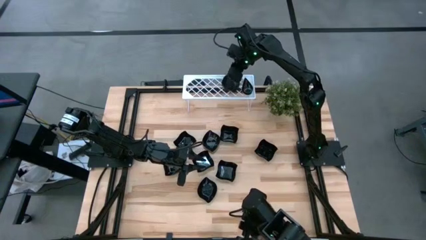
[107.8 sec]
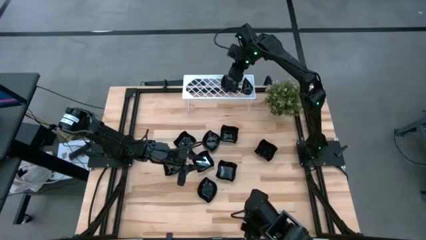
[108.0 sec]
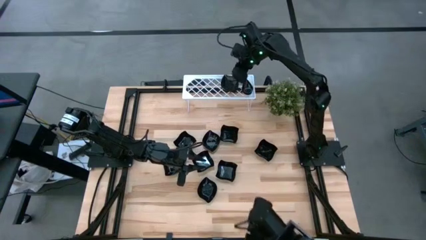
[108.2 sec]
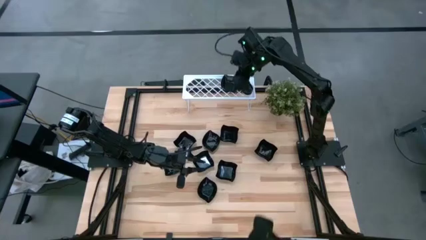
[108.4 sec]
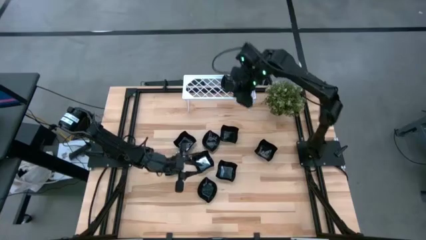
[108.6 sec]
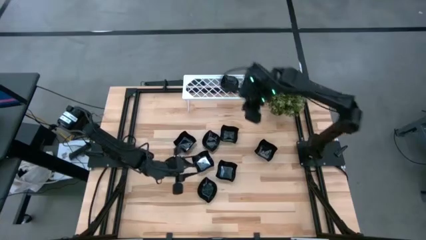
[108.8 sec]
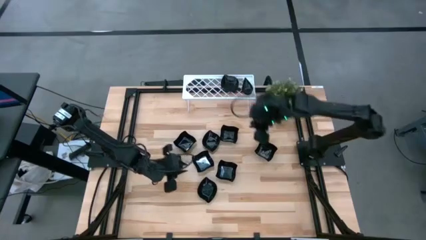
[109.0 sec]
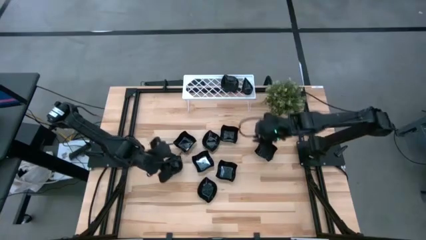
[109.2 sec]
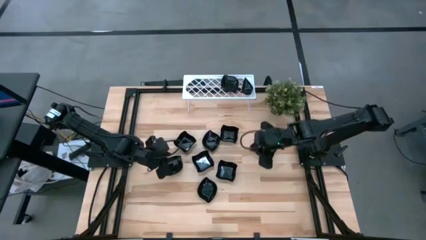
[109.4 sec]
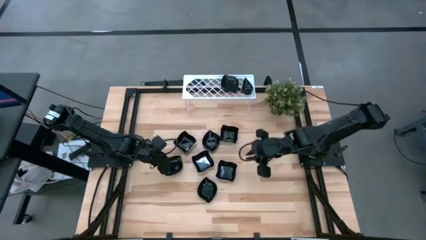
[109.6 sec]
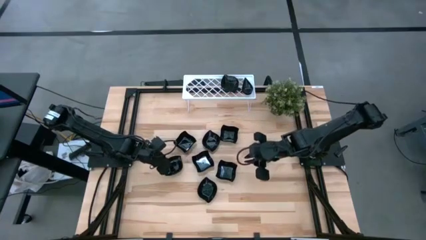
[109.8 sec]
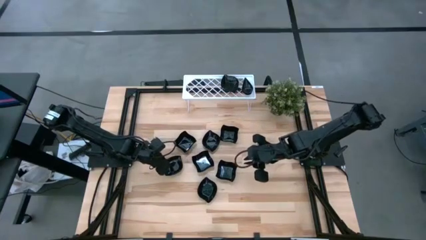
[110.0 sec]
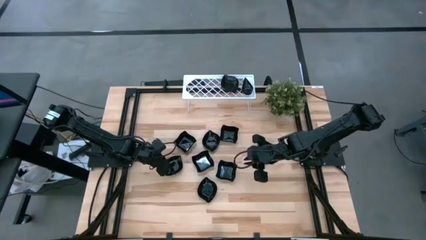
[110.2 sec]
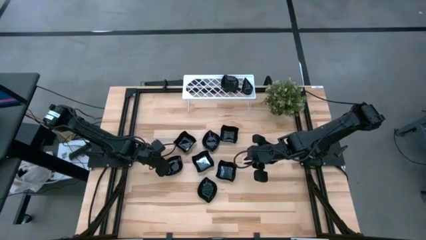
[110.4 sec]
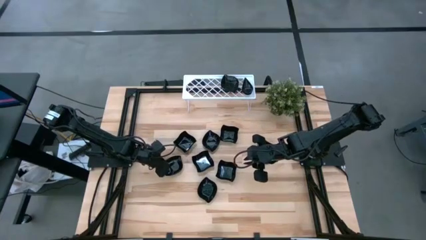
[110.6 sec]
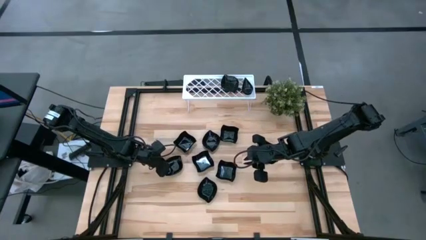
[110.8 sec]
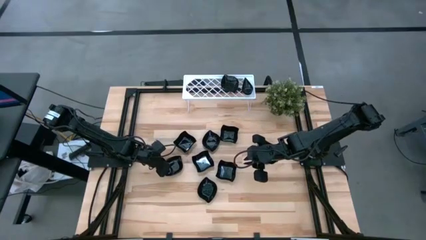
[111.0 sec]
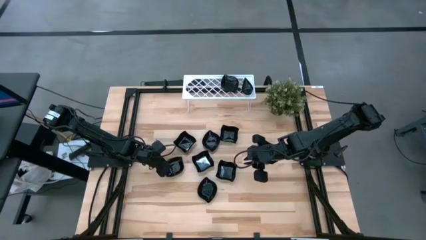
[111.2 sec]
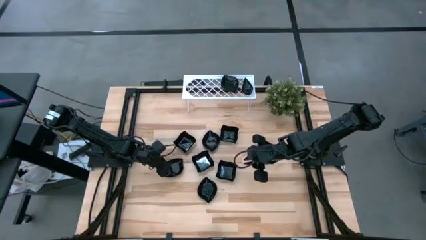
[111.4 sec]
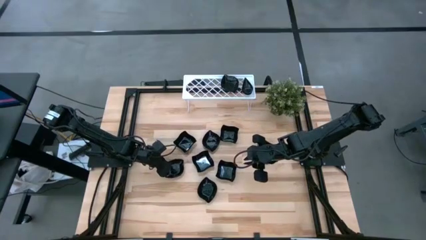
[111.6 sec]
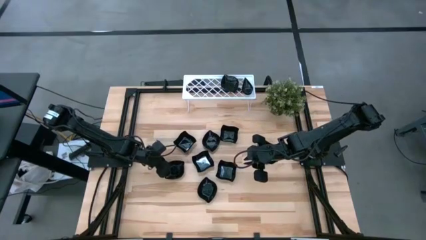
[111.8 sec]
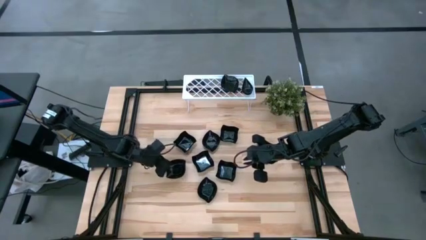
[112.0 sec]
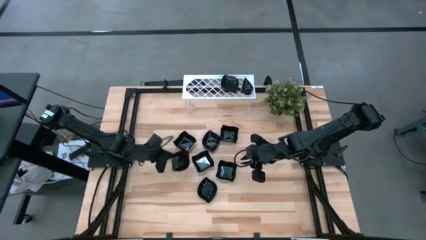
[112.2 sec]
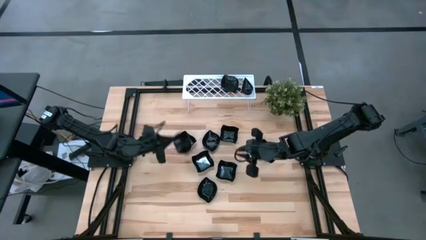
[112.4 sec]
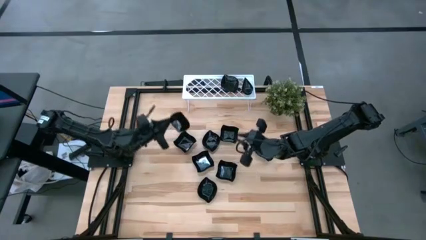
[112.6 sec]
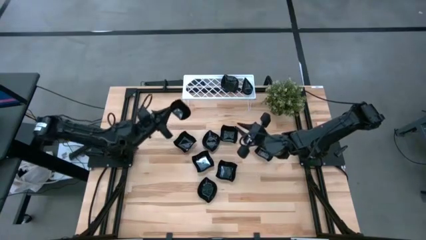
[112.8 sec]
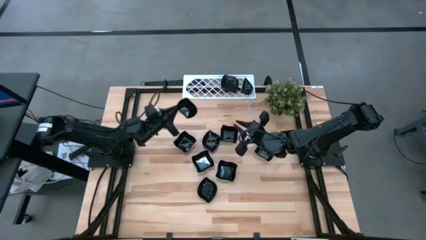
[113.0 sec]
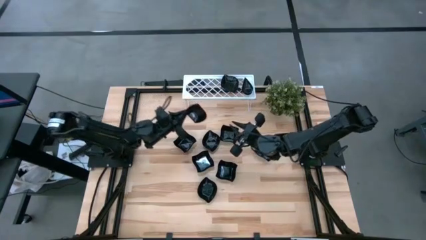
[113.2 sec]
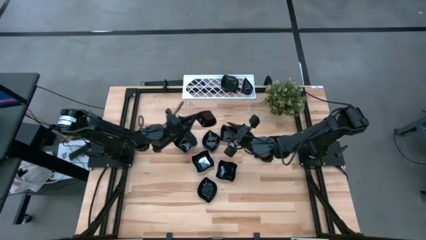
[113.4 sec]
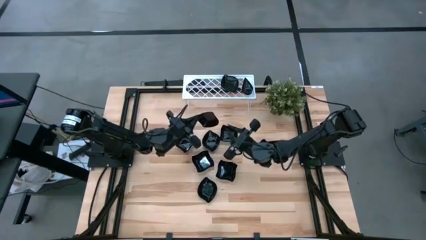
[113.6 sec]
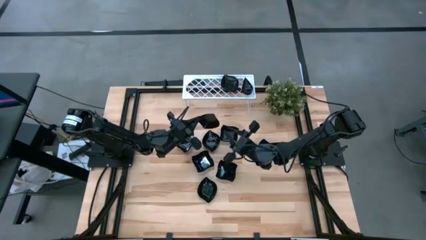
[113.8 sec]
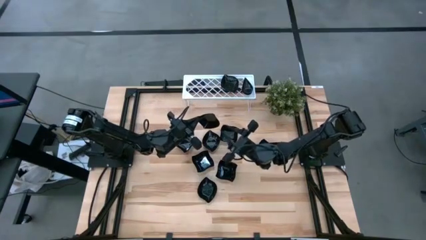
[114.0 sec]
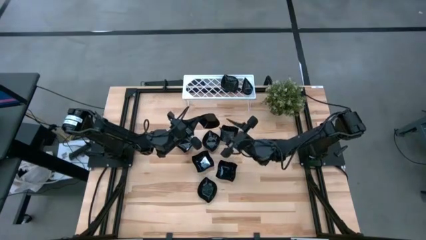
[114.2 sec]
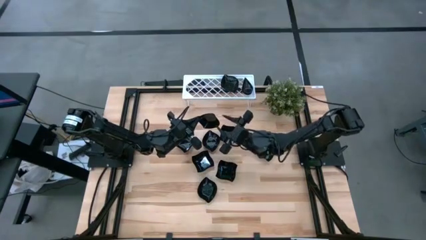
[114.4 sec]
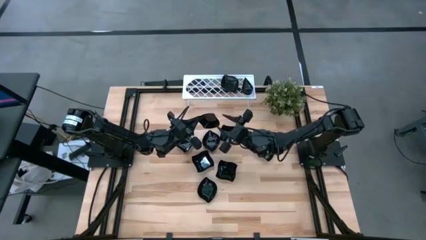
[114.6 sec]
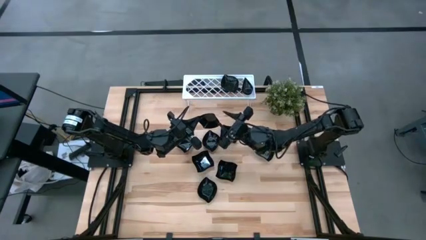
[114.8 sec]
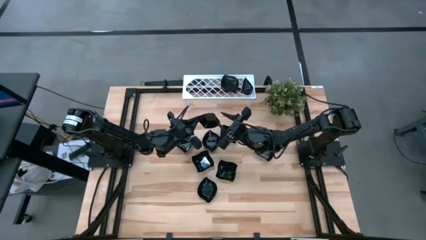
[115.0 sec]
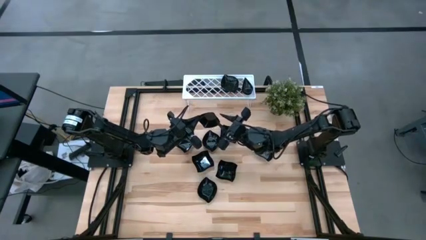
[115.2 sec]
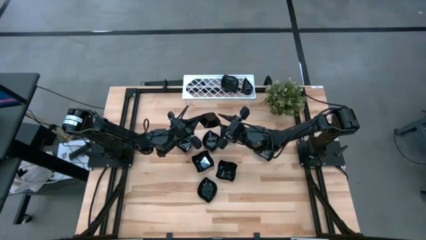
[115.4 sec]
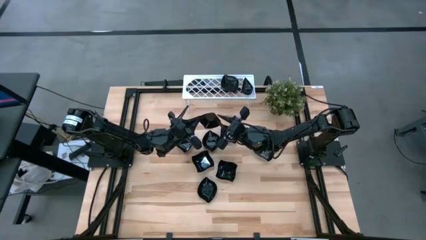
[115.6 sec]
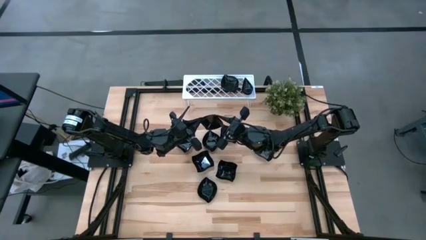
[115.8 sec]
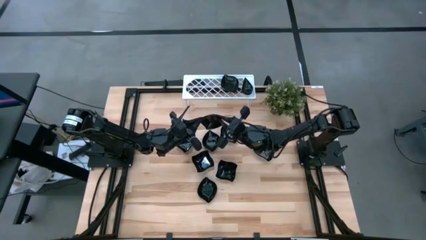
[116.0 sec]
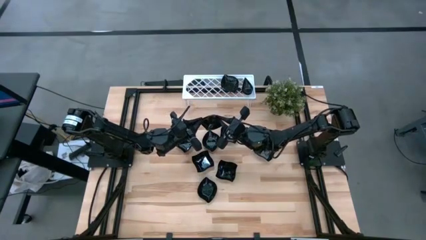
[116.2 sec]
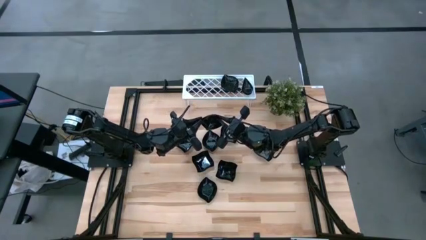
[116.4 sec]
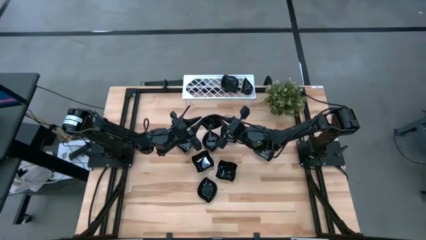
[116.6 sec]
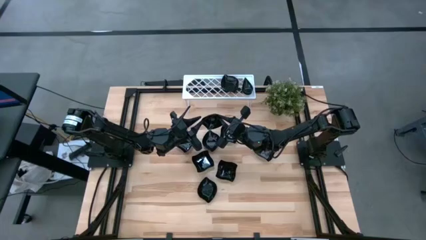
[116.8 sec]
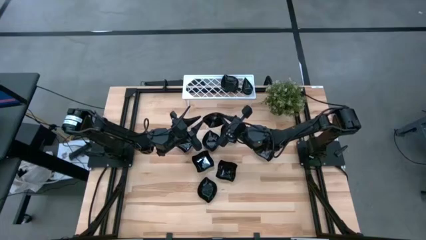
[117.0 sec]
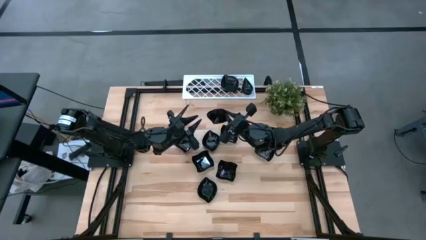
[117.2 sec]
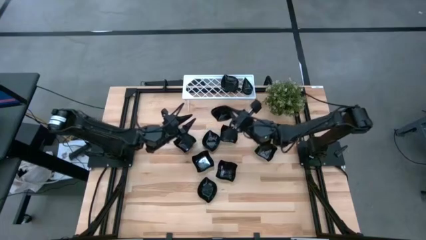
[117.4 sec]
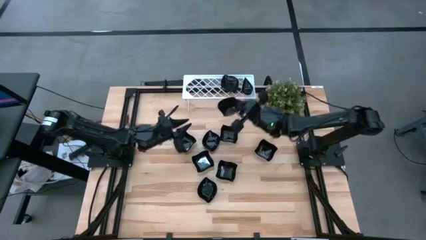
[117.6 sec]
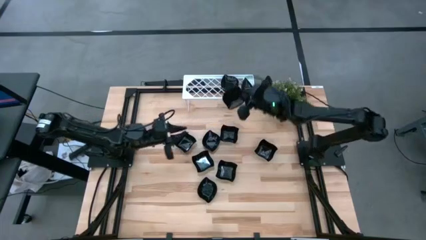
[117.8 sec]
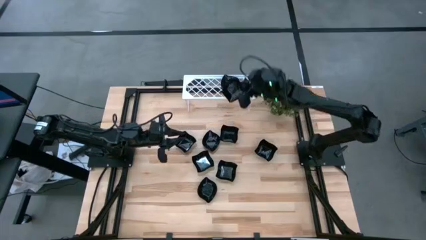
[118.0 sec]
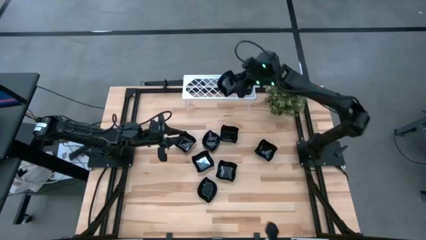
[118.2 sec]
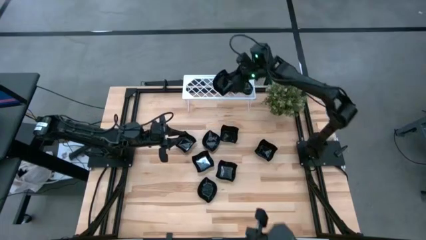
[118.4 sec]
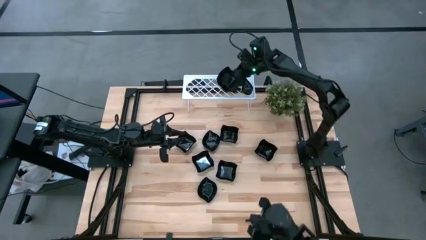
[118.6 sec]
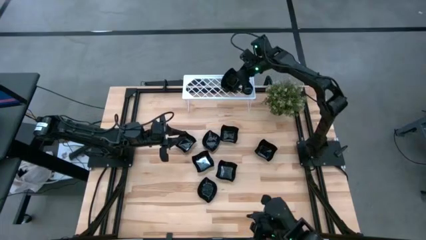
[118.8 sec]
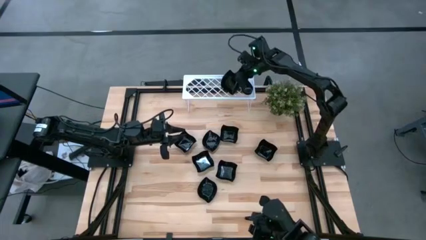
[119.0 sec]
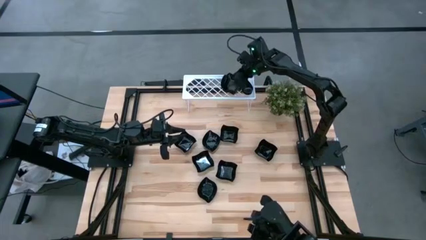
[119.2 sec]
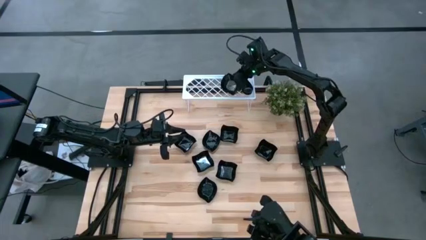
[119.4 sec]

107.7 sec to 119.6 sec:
Task: Pick & Place Mini shaped plates
Stack the leaf shaped plate on top of the leaf shaped plate on the shelf

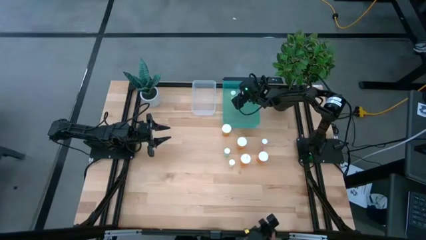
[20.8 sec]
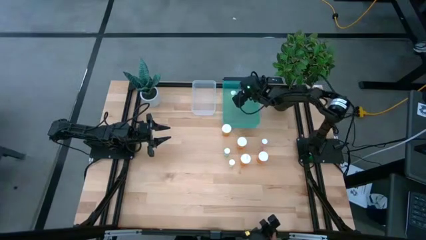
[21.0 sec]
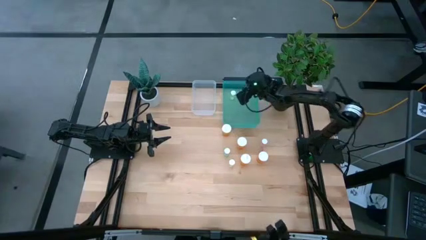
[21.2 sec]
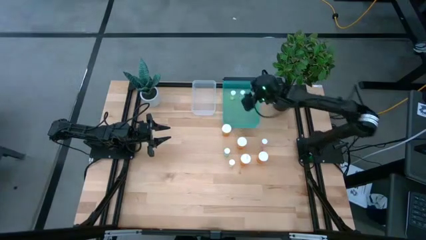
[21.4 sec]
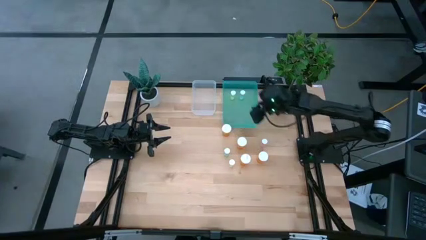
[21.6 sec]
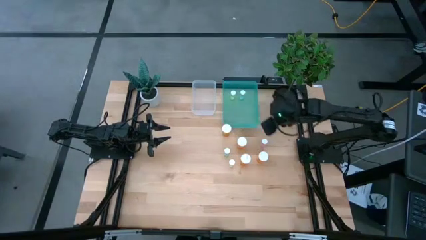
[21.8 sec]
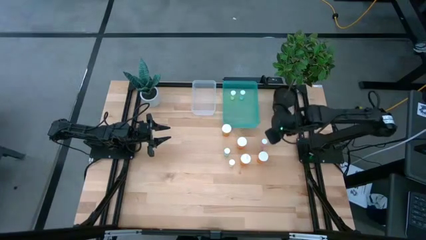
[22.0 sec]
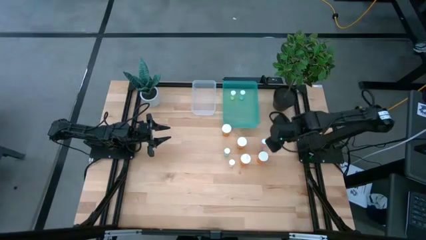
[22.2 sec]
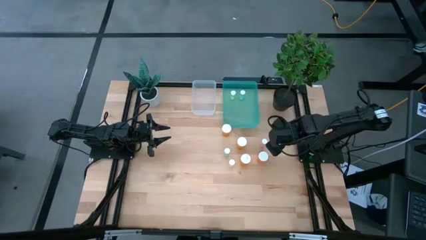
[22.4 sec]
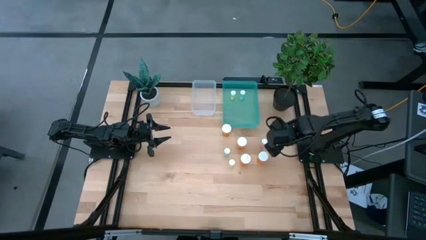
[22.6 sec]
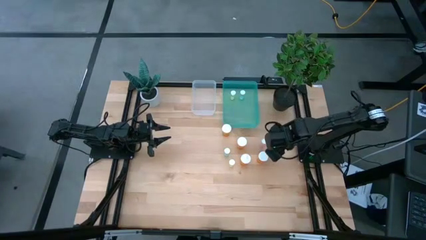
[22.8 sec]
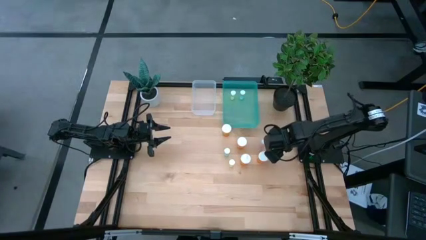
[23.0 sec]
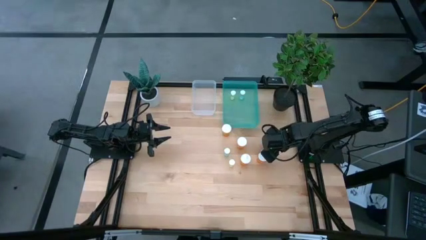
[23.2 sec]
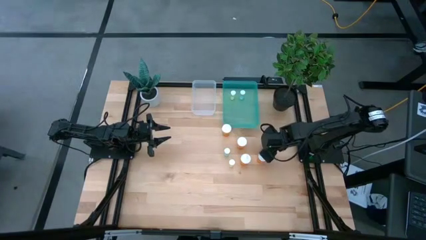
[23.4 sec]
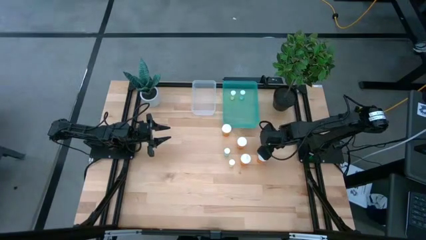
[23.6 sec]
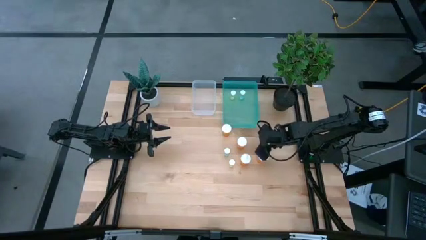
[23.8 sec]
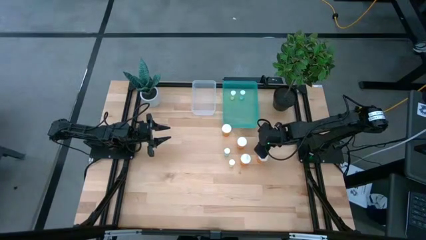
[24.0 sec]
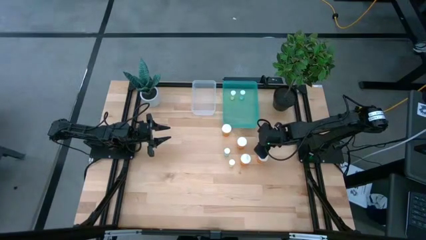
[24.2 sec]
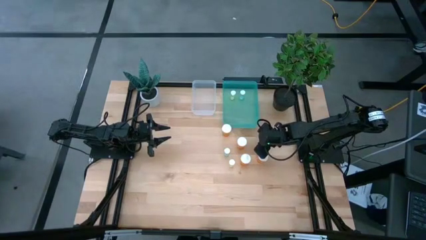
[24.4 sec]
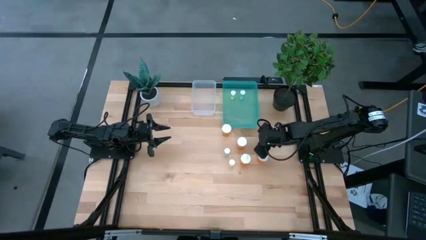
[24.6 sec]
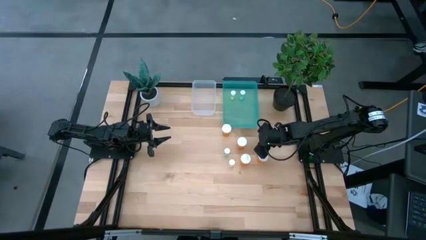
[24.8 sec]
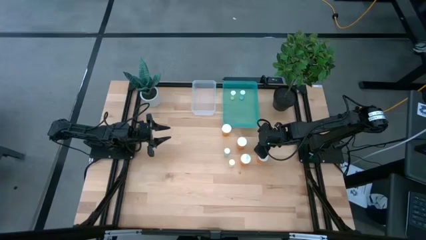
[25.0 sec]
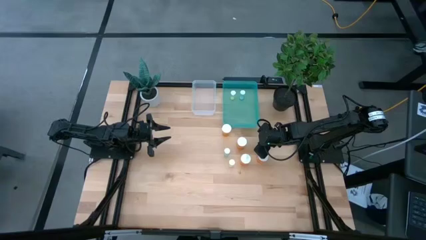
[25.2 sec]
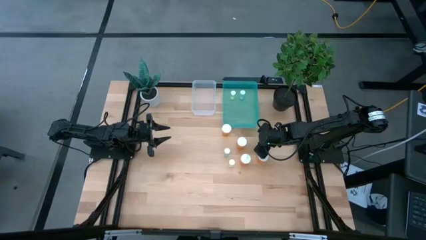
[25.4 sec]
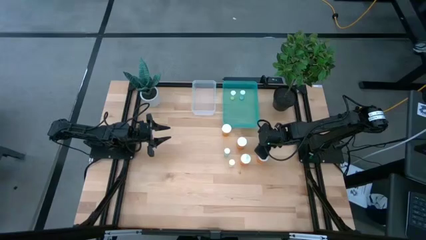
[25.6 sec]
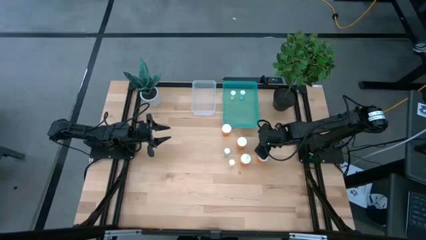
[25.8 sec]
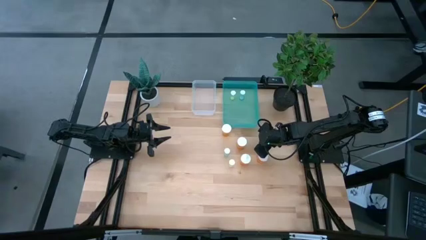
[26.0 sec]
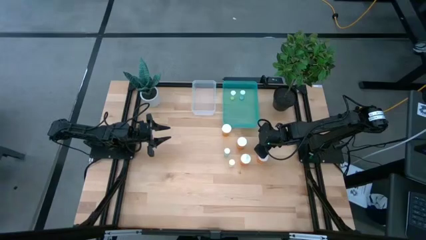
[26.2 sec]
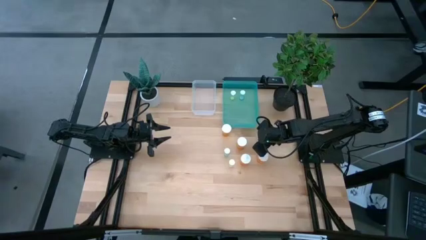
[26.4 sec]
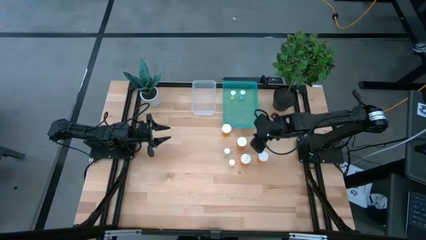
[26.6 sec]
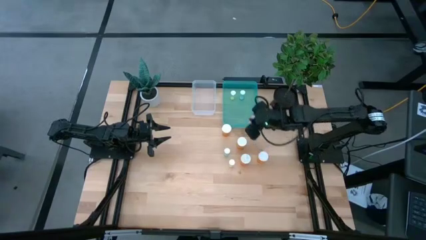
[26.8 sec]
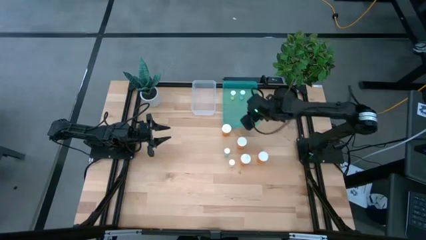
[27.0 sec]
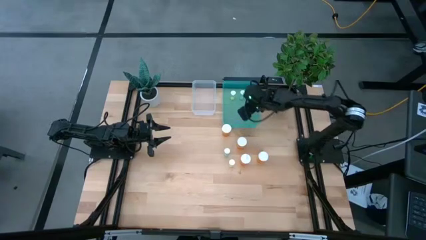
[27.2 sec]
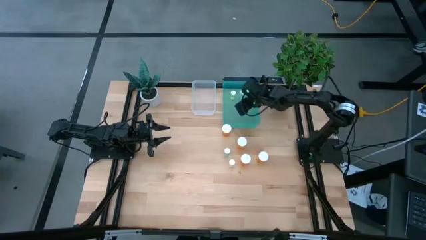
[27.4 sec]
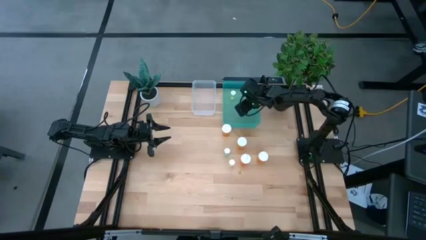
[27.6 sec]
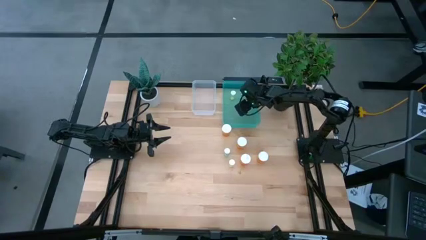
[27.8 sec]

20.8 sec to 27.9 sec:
Task: Pick and place medicine bottles into bin by pill shape (circle, oval)
Put the pink tablet bottle into the blue bin
